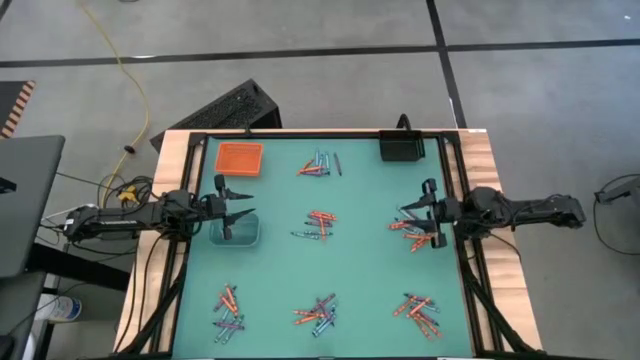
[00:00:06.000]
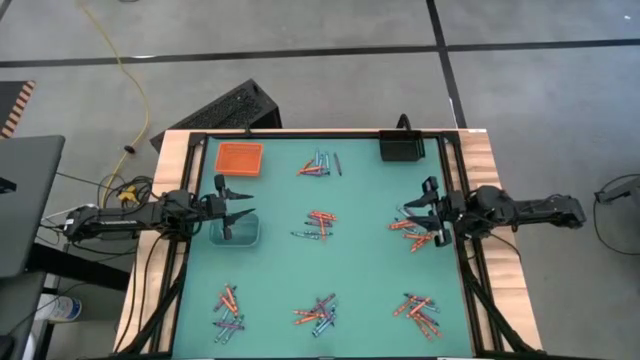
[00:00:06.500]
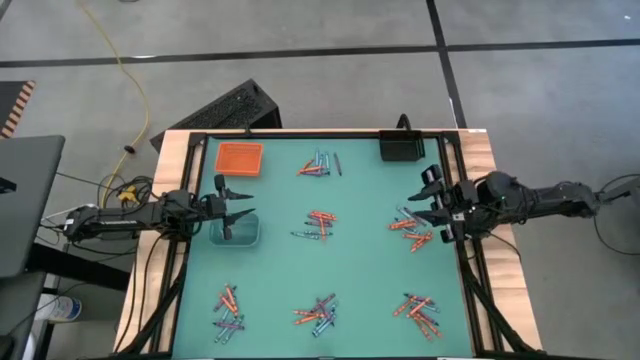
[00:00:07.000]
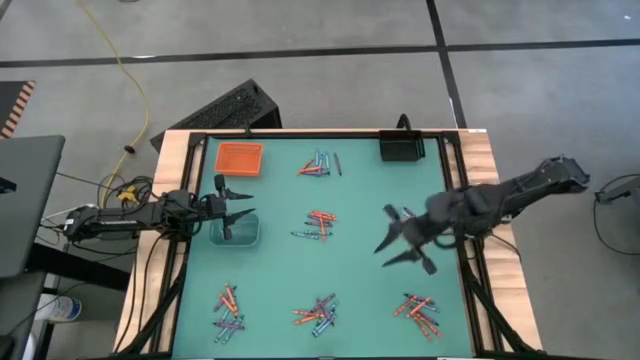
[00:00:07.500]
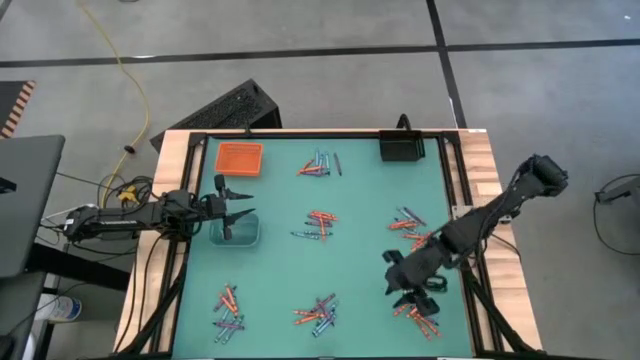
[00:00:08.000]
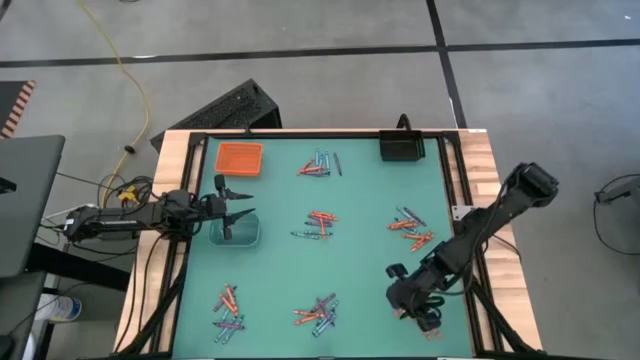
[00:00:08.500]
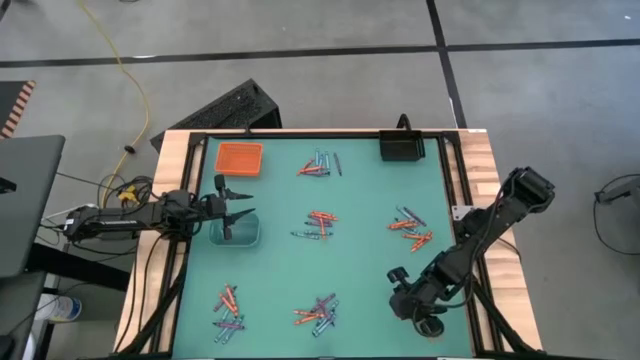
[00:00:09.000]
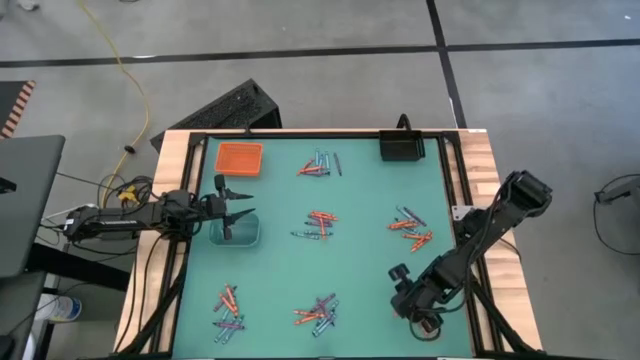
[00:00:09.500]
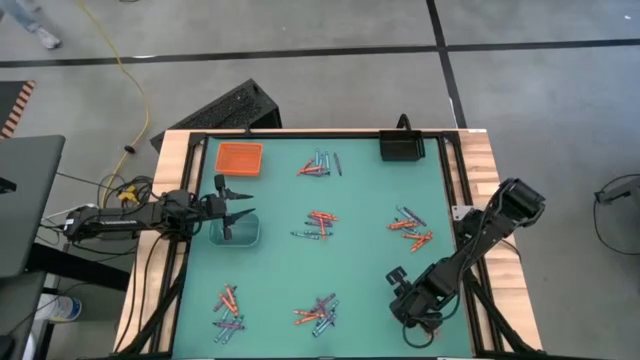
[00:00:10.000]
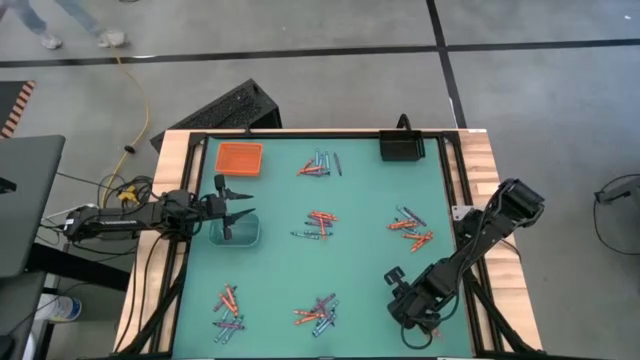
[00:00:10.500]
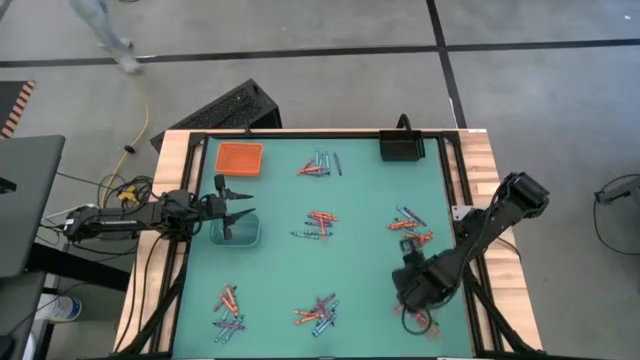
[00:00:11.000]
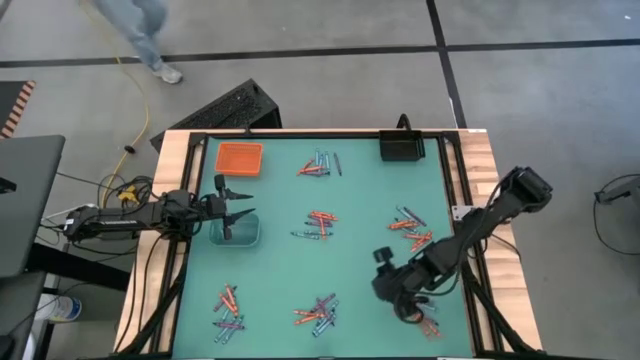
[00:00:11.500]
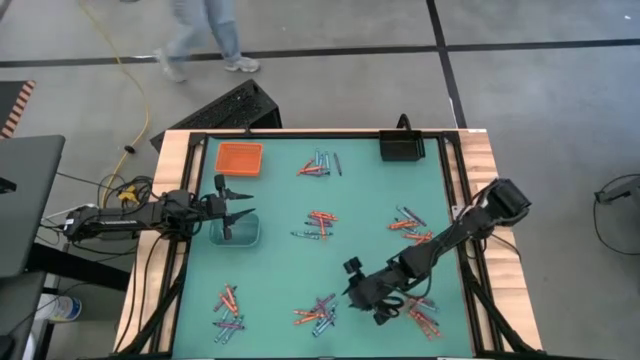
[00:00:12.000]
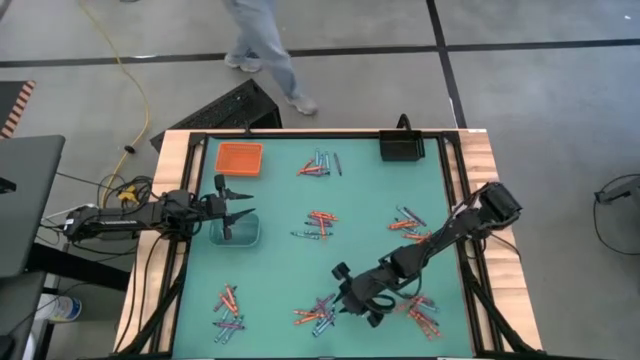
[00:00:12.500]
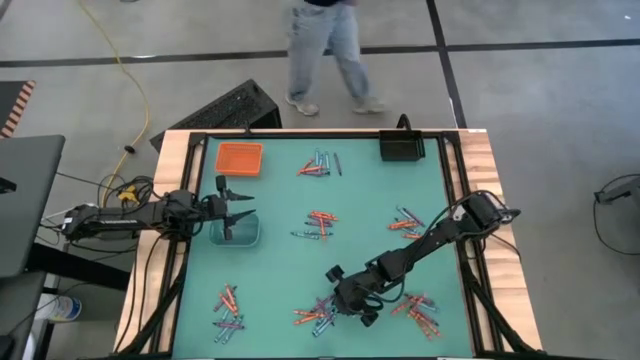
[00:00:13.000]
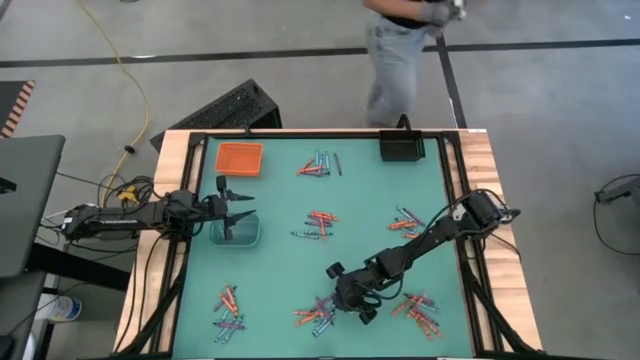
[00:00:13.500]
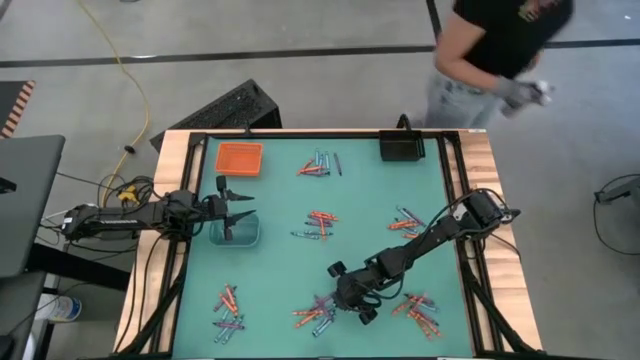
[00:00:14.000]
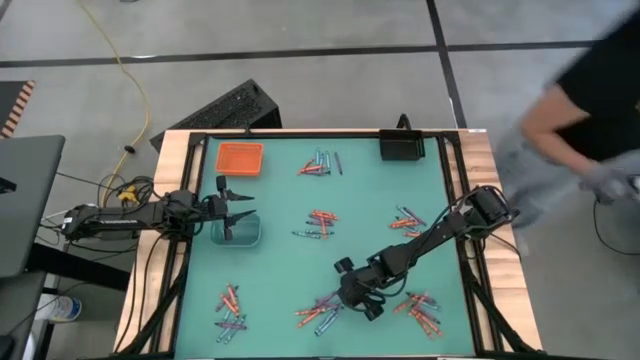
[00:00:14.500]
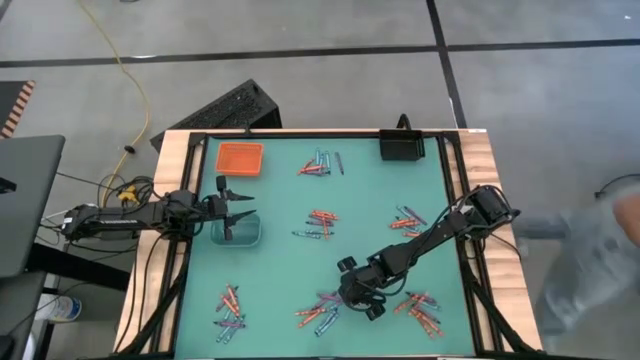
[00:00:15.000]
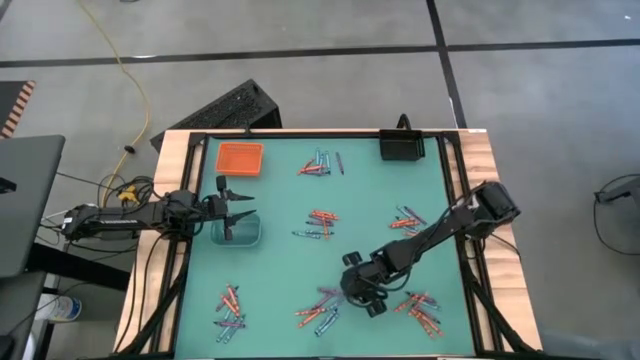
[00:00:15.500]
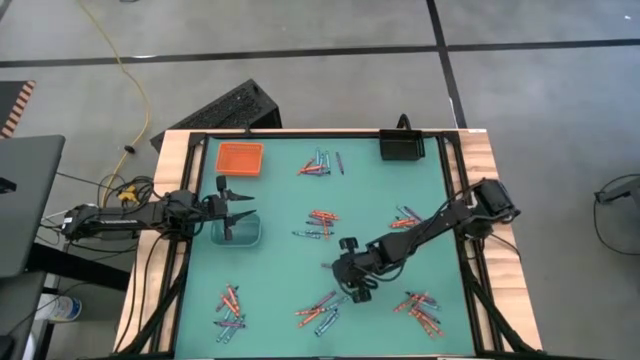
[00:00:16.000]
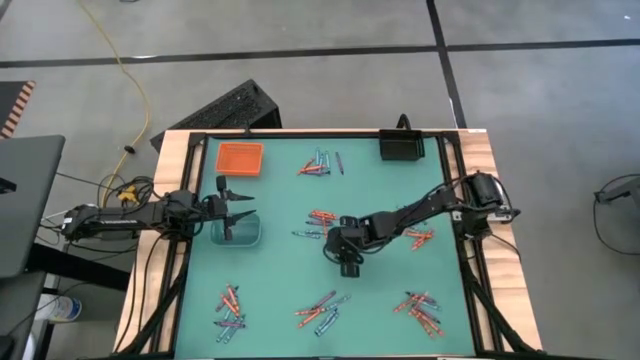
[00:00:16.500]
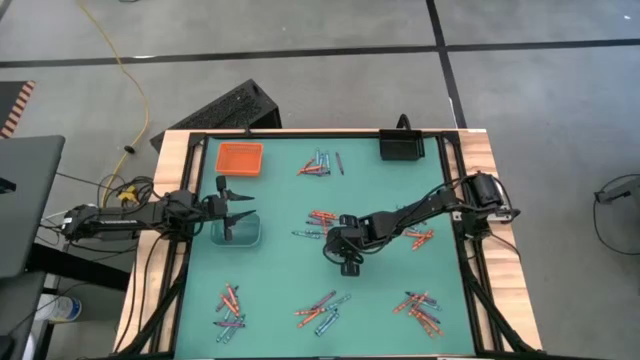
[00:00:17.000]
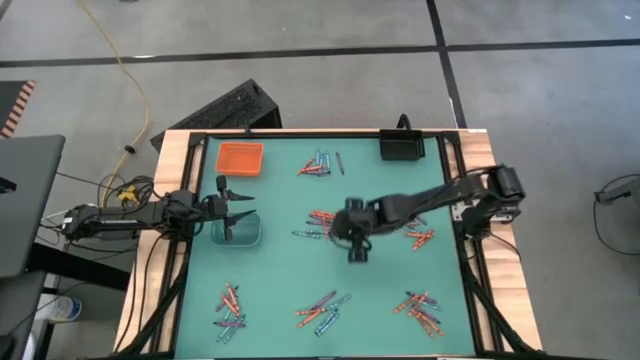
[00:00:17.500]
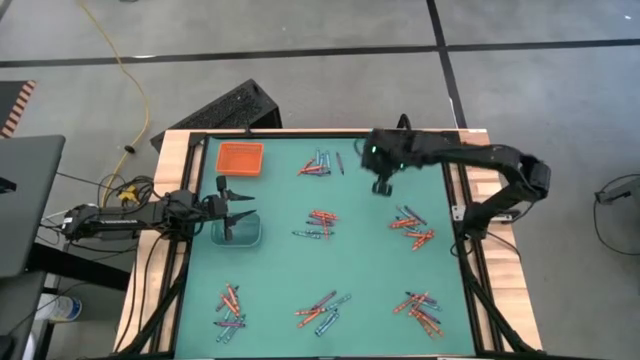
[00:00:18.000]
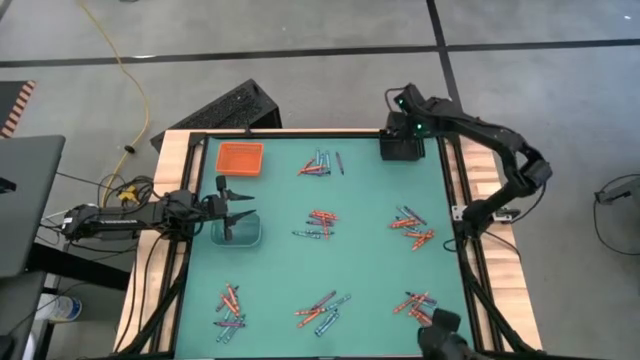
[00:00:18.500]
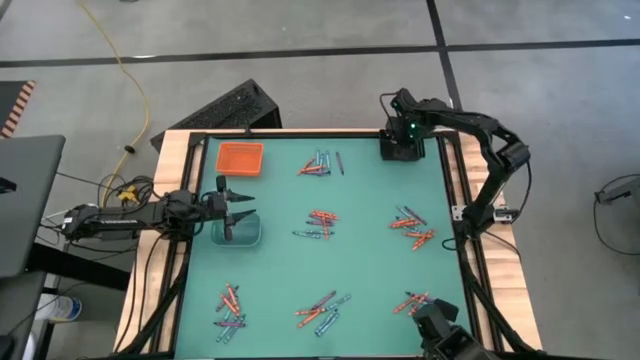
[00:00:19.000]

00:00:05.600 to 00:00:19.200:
Task: Sort crayons
Put the purple crayon into the black basket

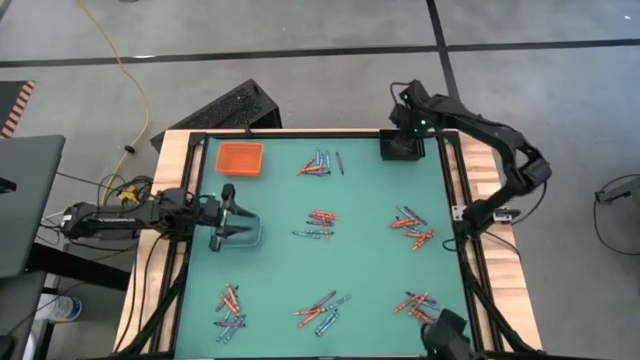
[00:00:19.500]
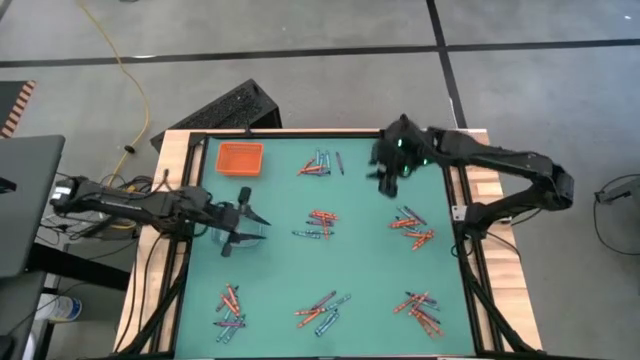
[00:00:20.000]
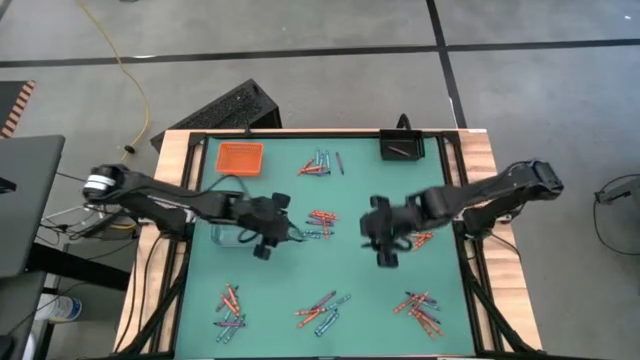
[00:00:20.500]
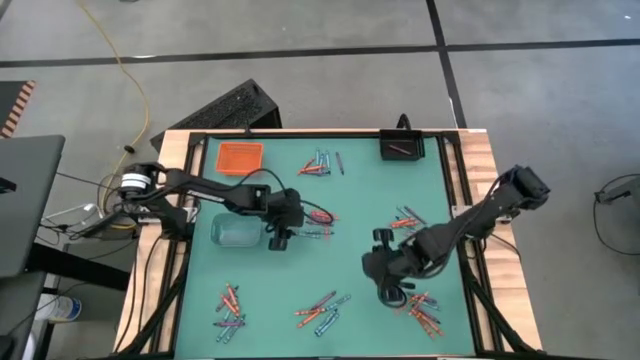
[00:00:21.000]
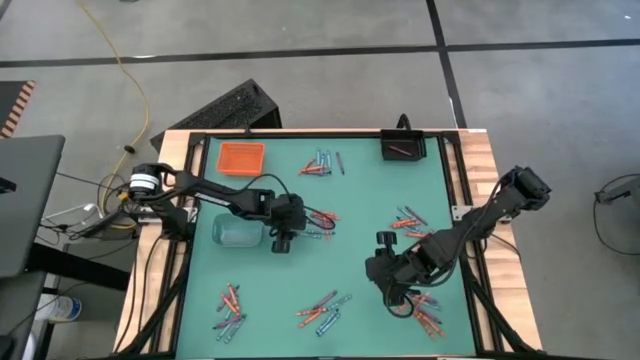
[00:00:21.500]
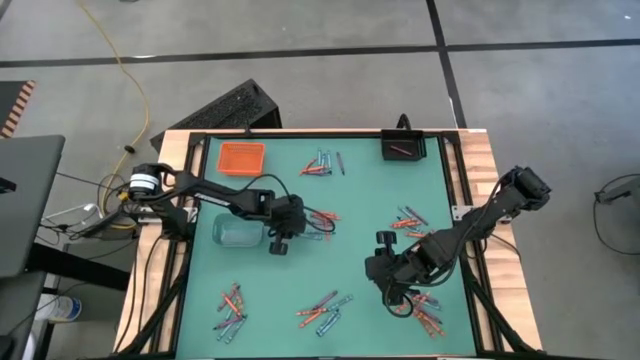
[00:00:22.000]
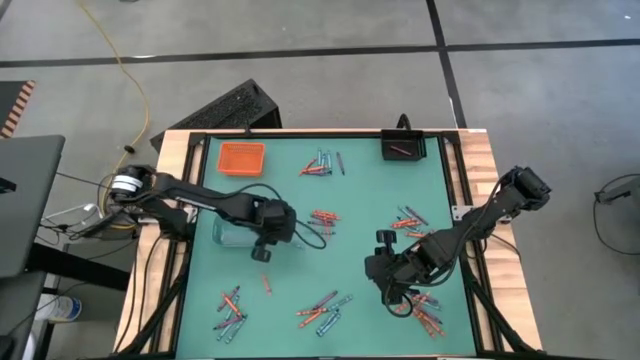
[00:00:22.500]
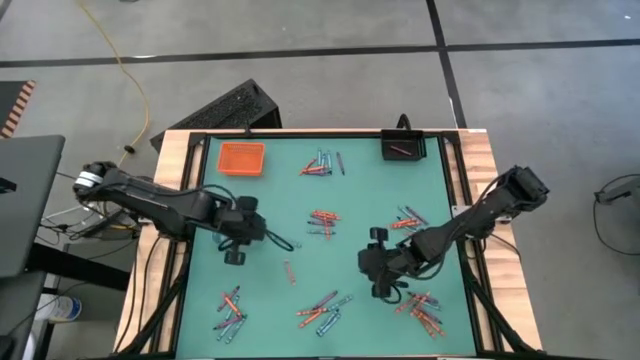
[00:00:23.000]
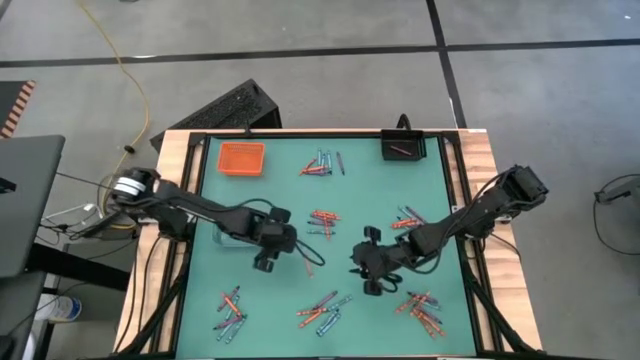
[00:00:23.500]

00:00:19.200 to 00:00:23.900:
Put the blue crayon into the blue bin

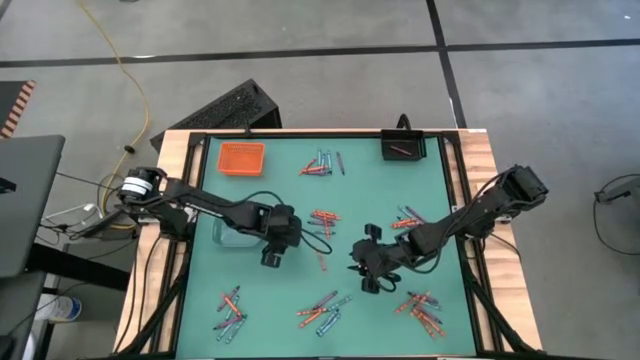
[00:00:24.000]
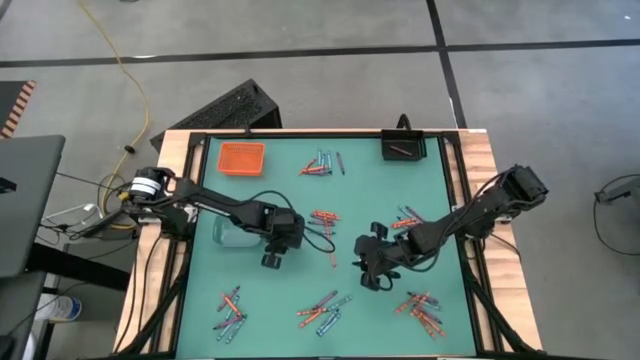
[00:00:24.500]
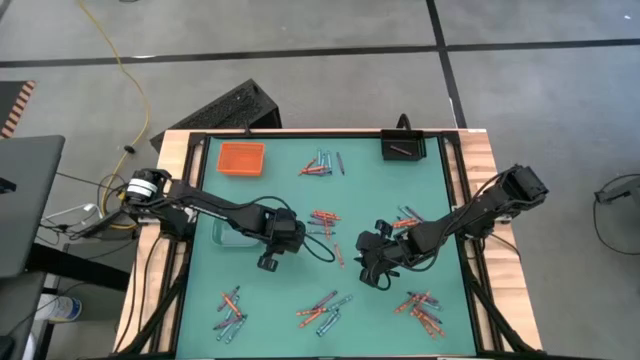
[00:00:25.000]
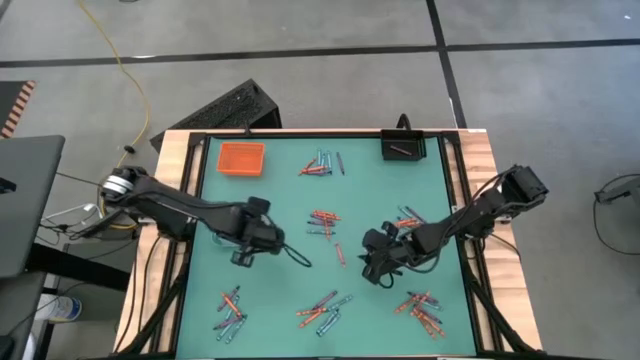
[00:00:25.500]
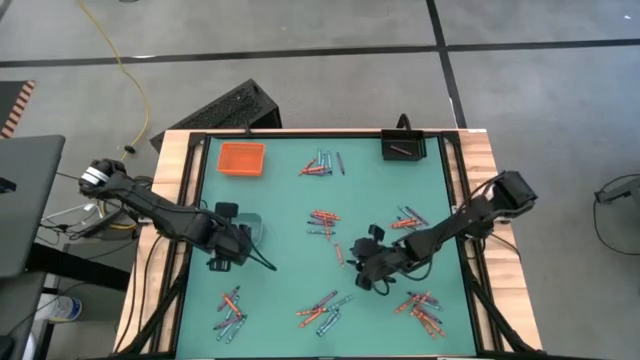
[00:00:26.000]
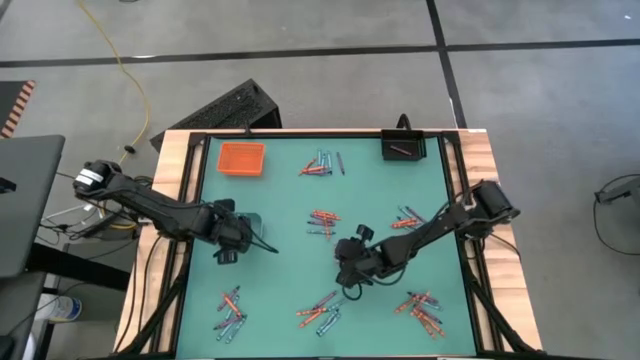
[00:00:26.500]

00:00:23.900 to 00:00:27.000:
Put the blue crayon into the blue bin
